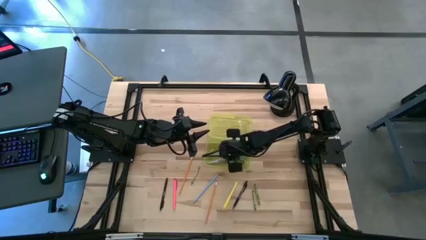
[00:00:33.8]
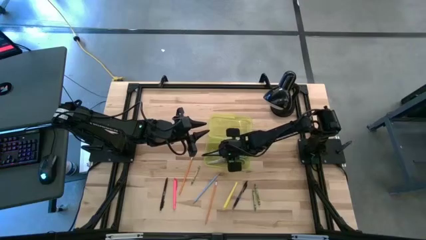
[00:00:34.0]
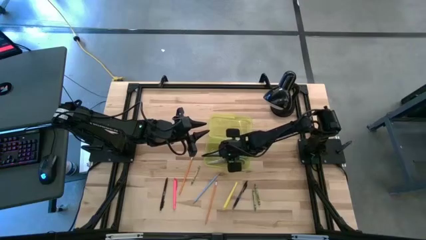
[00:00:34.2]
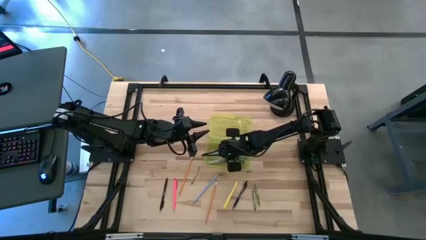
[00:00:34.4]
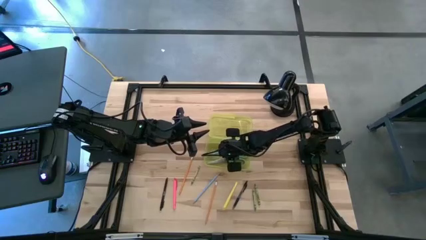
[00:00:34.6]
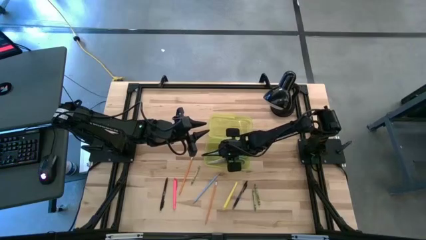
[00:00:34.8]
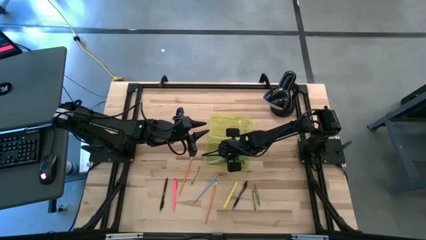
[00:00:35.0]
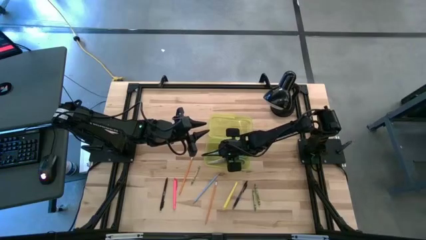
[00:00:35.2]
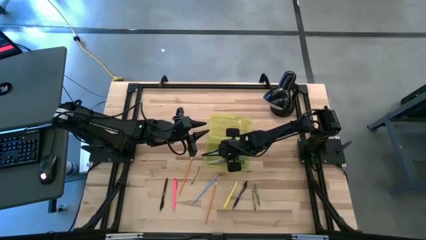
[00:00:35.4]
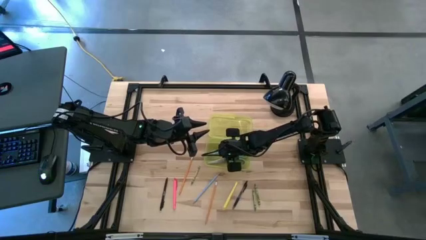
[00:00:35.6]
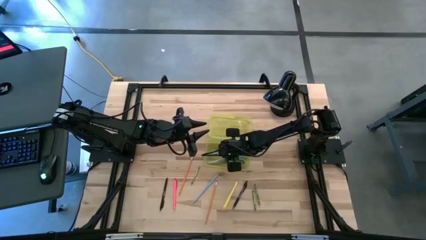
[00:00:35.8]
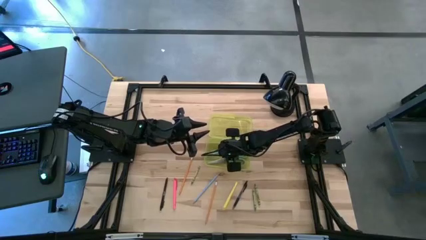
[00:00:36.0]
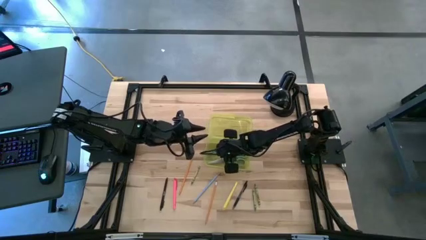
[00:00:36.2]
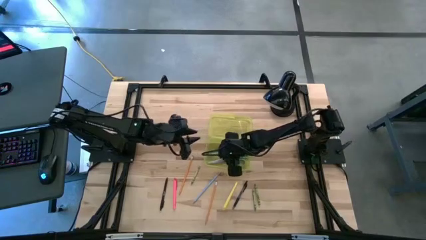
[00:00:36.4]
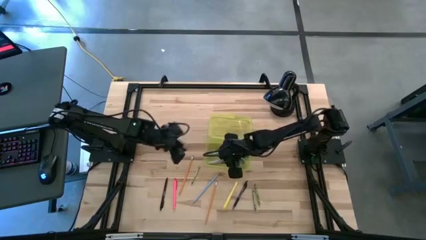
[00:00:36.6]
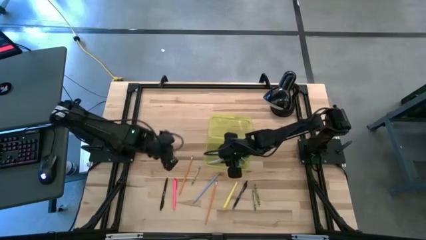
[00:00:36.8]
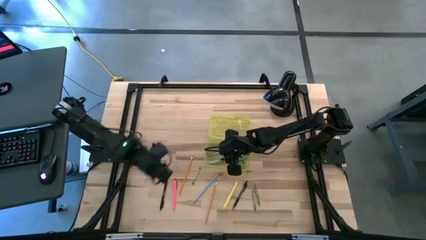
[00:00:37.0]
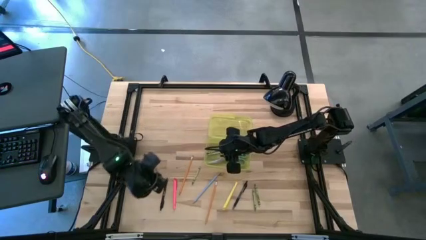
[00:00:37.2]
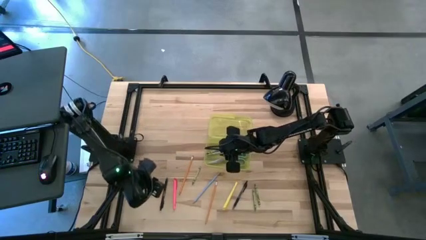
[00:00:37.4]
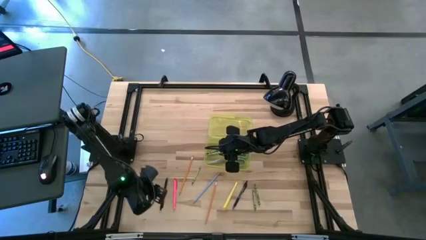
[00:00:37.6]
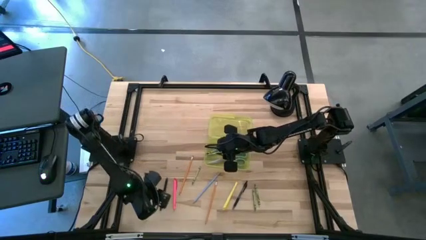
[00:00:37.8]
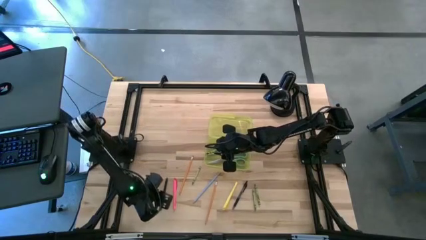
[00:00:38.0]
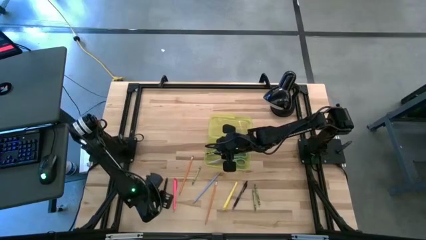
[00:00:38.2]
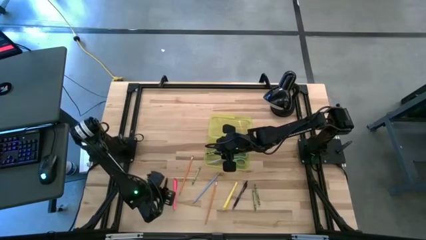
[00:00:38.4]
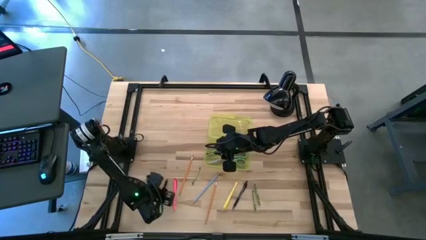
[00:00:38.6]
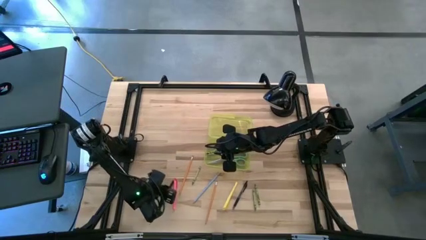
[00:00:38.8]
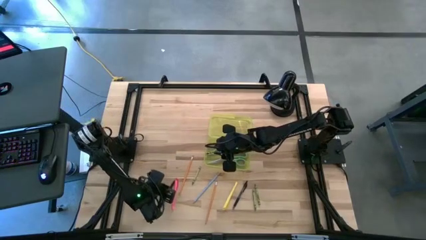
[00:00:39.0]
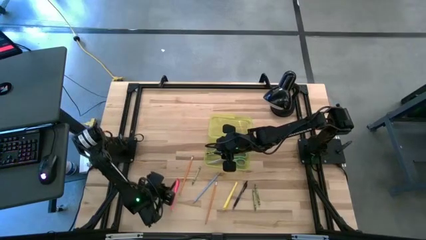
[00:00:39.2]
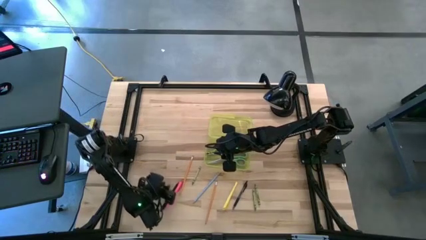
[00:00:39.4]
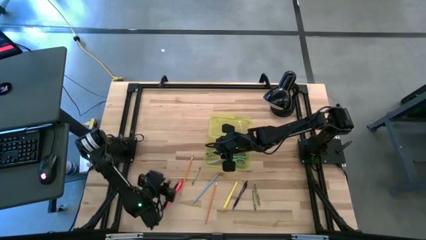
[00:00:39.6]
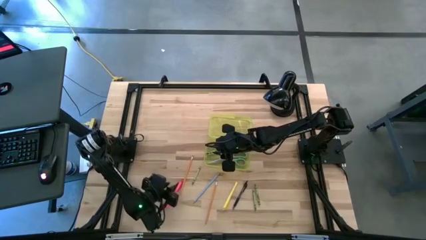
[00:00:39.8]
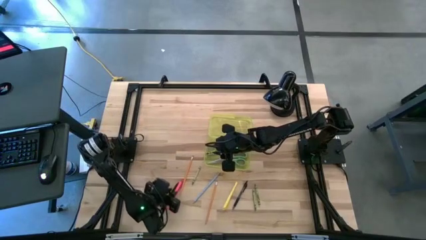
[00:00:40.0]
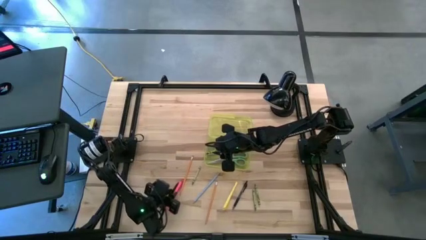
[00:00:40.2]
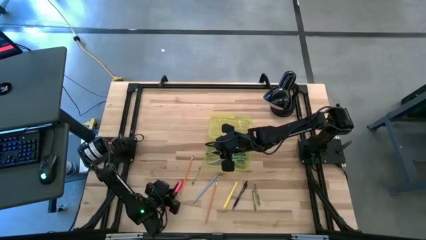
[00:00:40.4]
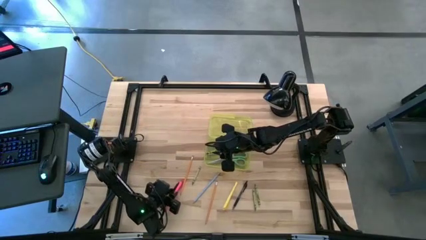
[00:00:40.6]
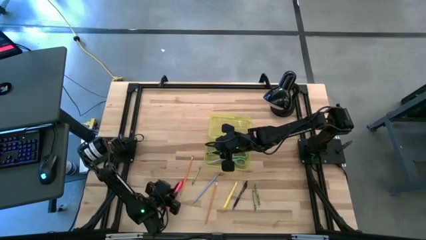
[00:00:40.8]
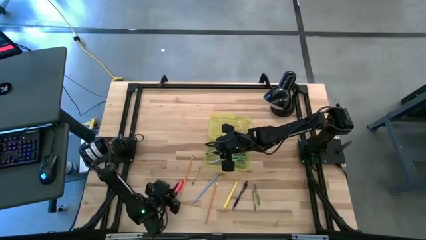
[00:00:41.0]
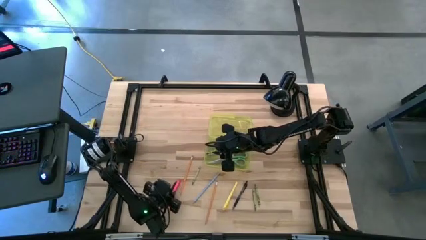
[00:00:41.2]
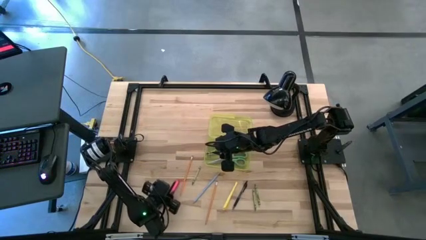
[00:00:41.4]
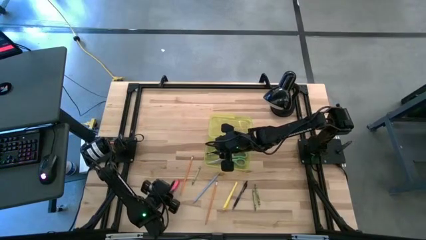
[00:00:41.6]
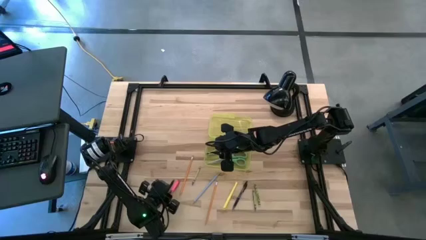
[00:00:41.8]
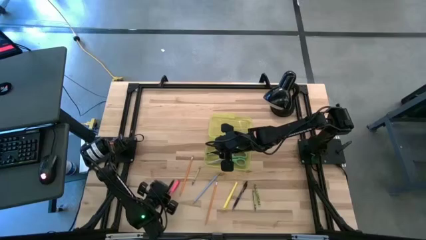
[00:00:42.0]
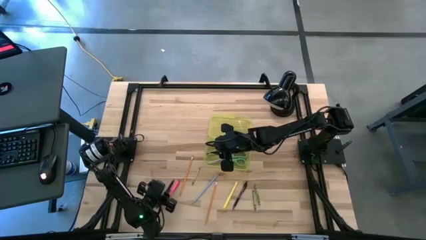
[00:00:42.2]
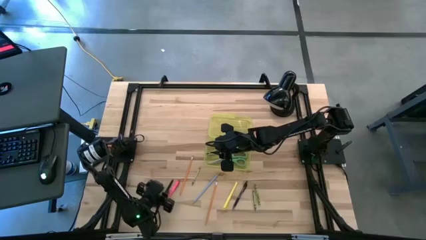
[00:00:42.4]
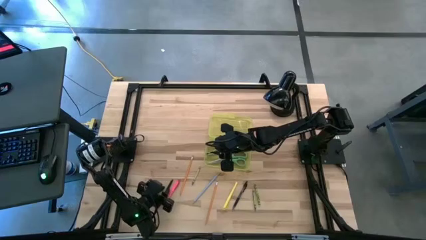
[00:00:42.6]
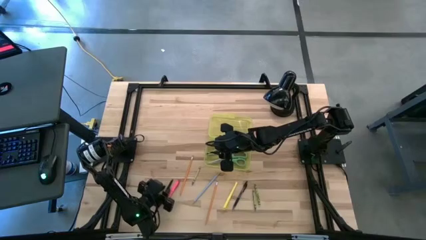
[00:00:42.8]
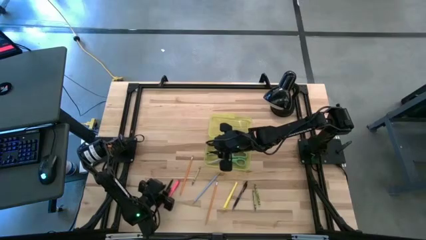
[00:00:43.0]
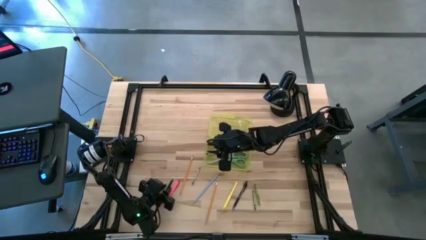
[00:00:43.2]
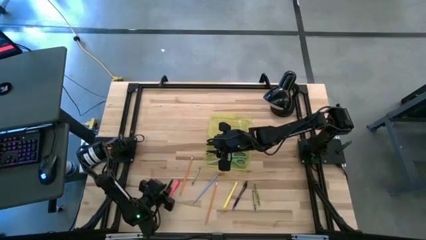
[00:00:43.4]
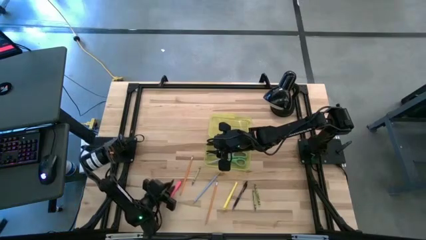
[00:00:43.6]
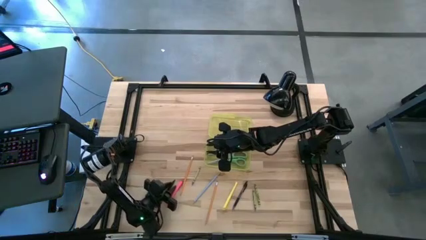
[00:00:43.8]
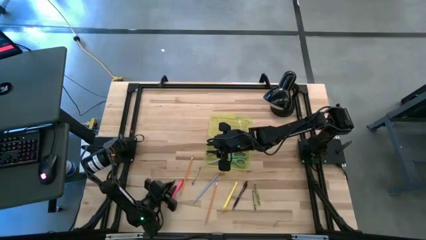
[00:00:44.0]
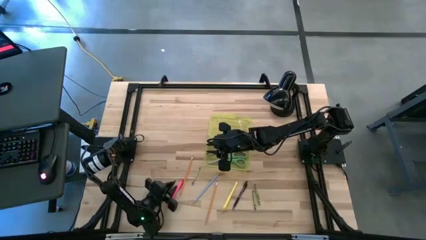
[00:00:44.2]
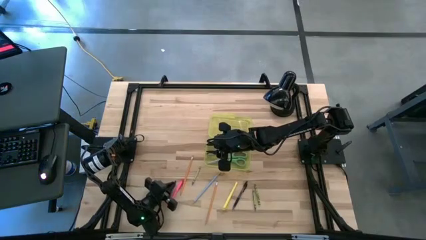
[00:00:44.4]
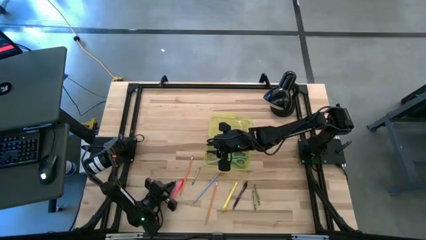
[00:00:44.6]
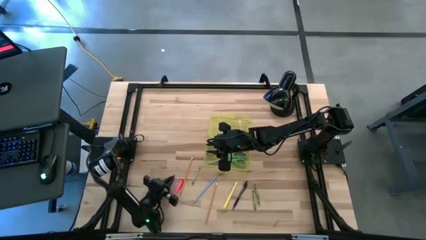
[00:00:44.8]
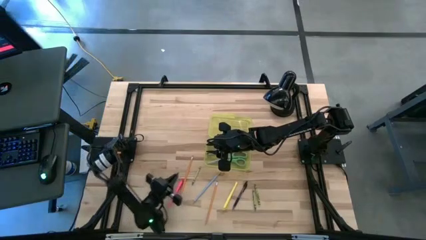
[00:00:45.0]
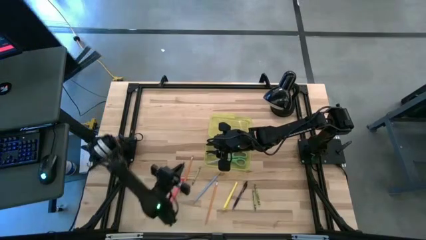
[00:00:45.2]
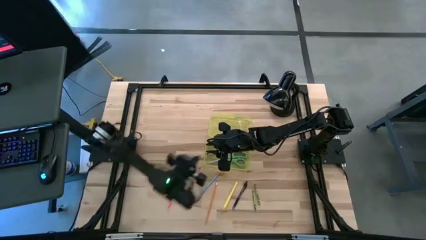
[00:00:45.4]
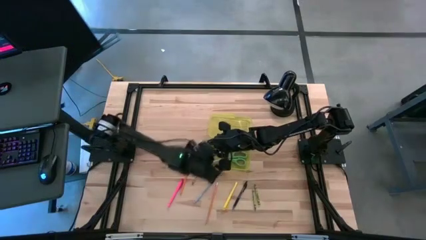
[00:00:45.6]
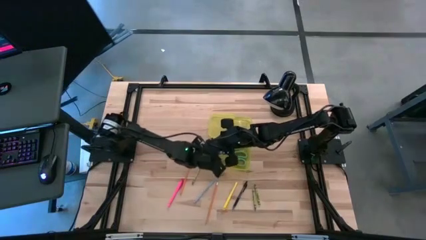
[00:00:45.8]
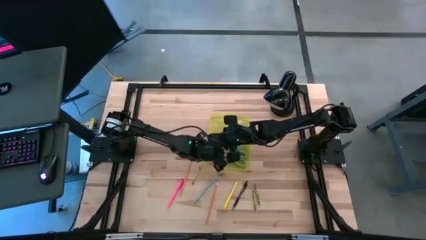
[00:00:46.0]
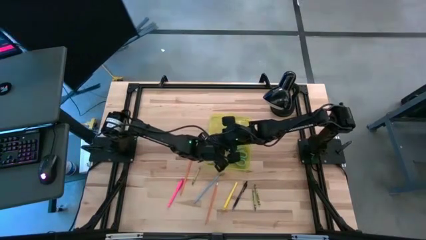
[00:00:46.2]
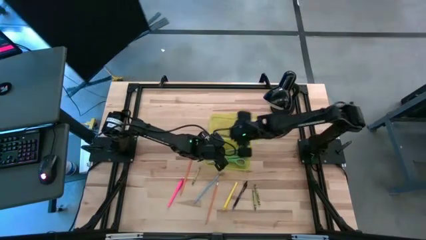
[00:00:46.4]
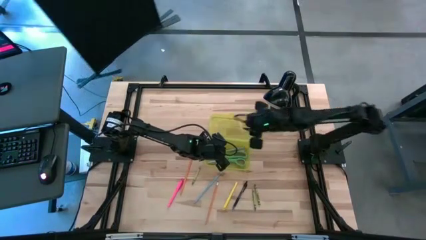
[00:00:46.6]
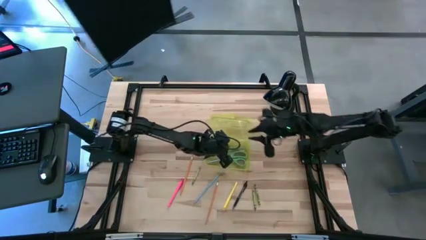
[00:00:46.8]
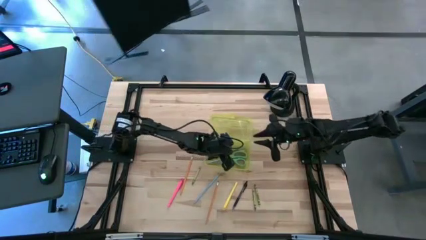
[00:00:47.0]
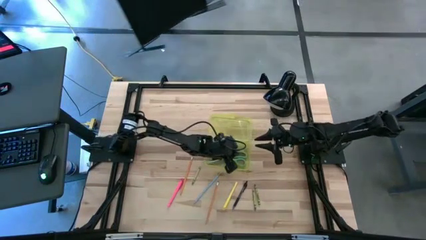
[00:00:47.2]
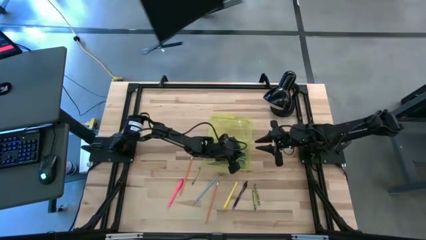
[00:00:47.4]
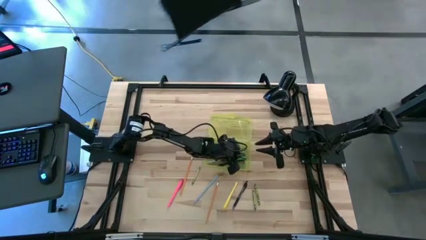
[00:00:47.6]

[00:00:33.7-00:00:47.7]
Task: Pick & place school supplies into a supply box
Put the black pen into the yellow supply box

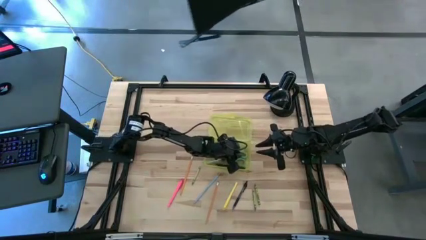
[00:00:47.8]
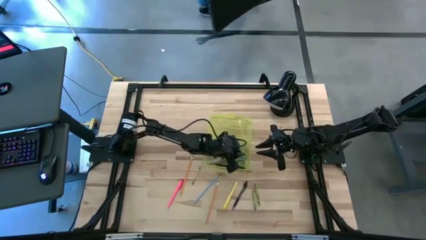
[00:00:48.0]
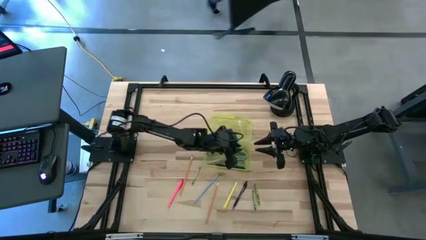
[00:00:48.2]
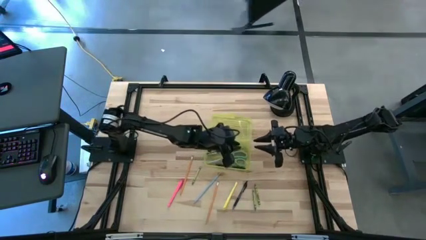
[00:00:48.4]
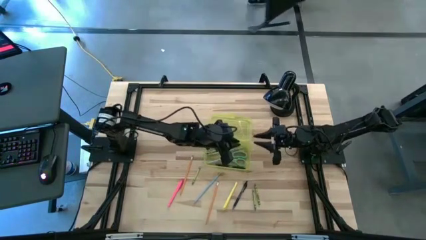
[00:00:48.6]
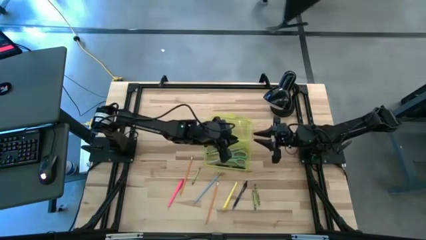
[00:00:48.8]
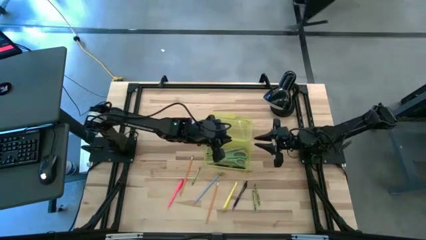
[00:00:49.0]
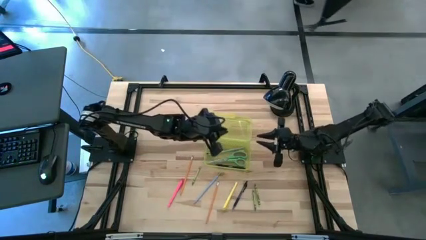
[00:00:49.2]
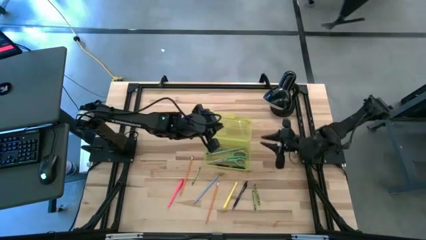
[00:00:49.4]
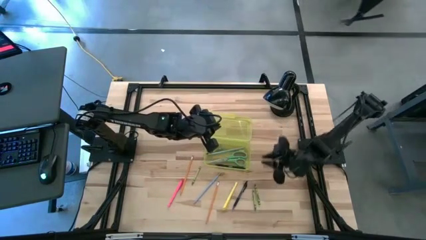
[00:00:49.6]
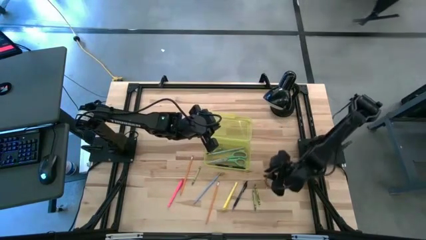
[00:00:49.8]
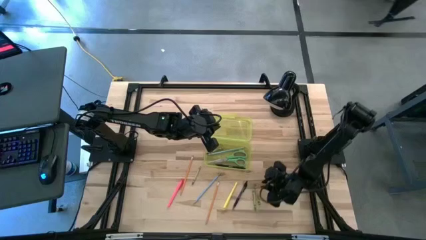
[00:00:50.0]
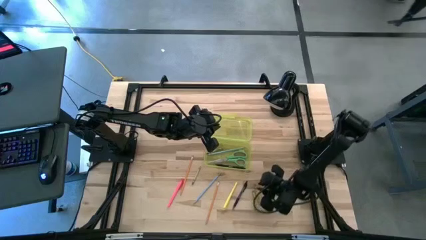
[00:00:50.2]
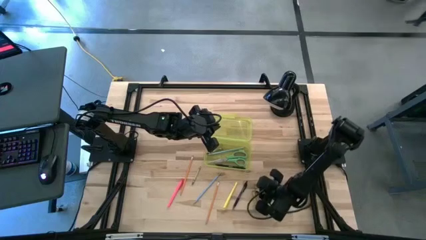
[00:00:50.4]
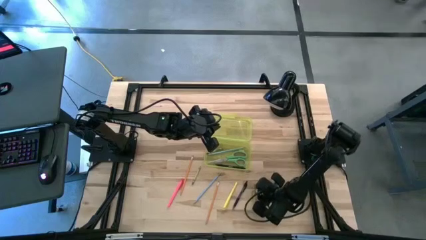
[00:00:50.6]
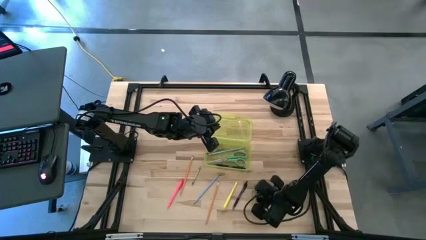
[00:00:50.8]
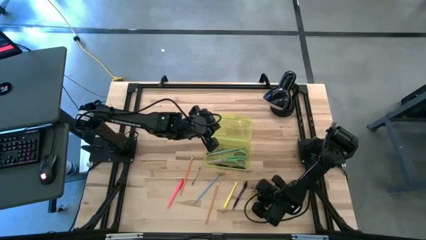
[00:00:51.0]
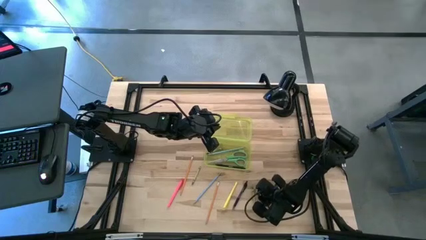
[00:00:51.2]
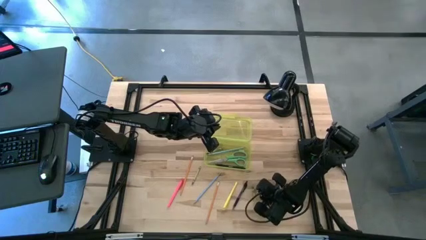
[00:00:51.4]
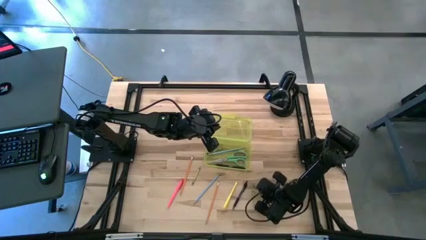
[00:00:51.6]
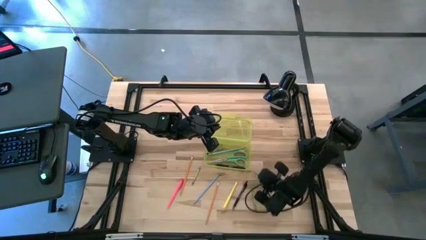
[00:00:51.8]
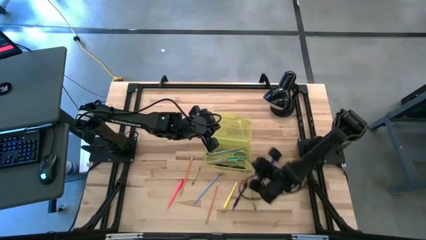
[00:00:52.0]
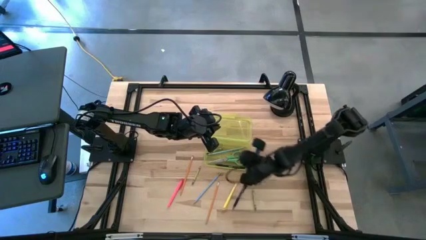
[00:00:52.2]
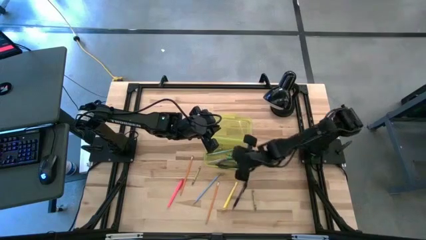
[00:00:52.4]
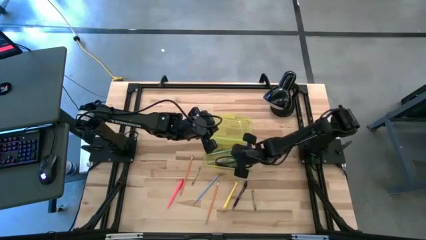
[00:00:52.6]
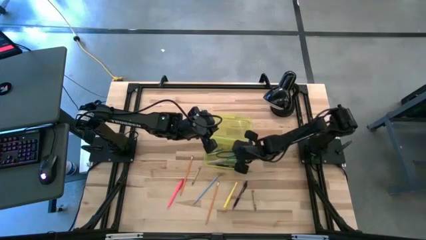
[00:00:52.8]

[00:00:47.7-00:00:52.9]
Put the green crayon into the yellow supply box
